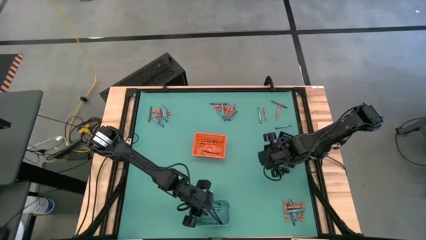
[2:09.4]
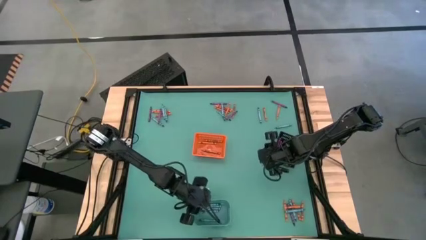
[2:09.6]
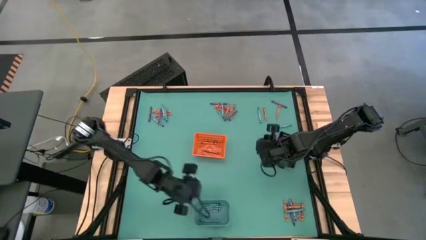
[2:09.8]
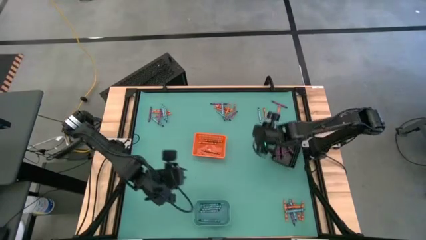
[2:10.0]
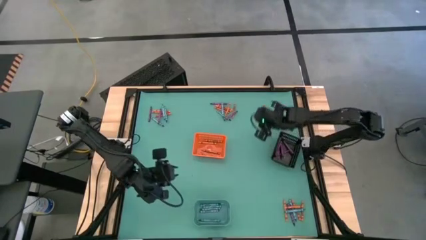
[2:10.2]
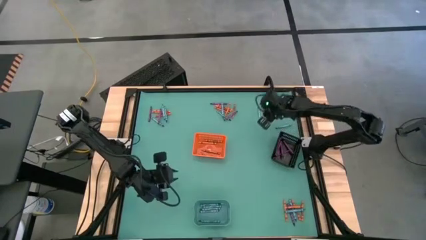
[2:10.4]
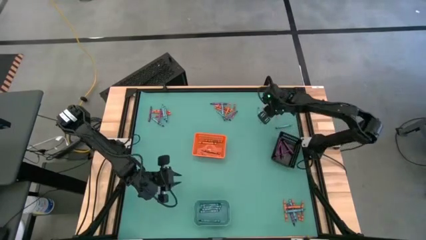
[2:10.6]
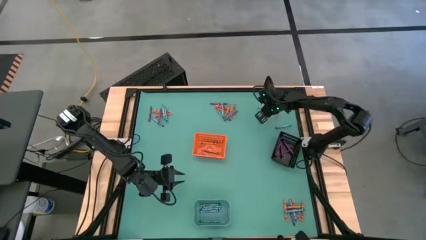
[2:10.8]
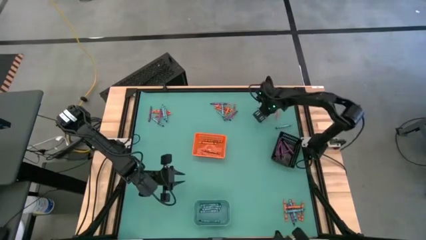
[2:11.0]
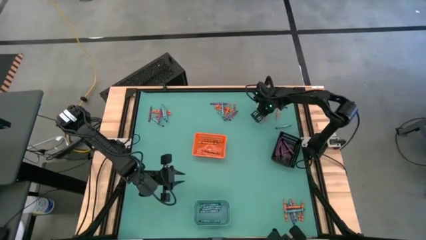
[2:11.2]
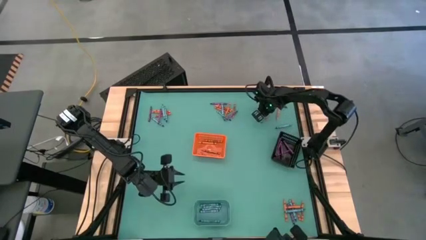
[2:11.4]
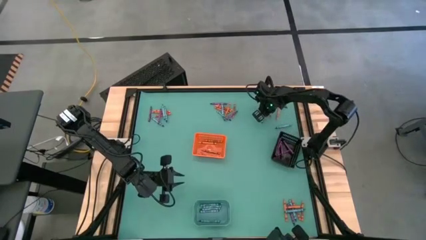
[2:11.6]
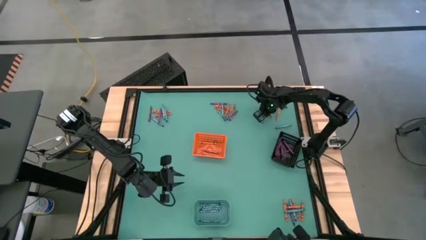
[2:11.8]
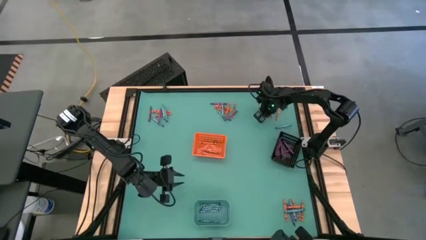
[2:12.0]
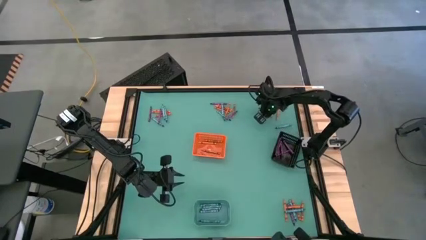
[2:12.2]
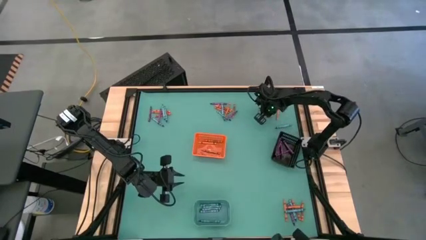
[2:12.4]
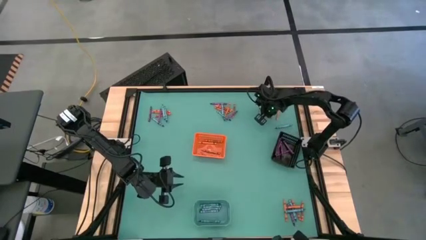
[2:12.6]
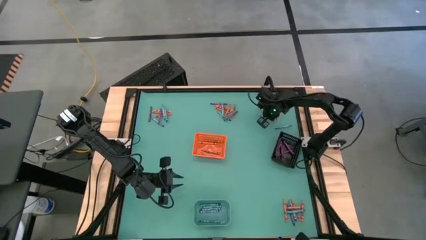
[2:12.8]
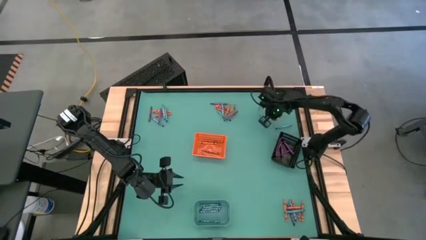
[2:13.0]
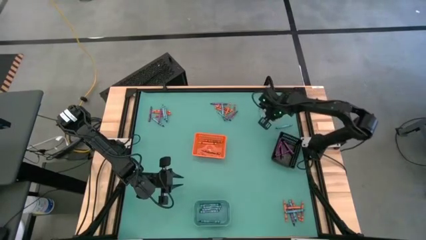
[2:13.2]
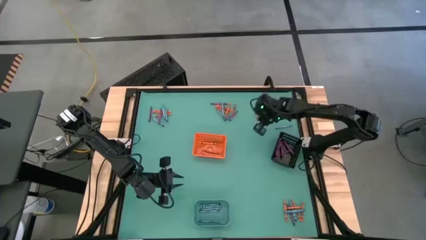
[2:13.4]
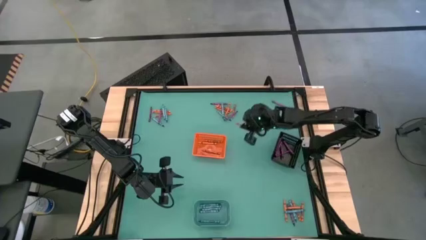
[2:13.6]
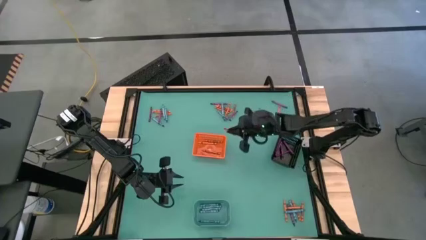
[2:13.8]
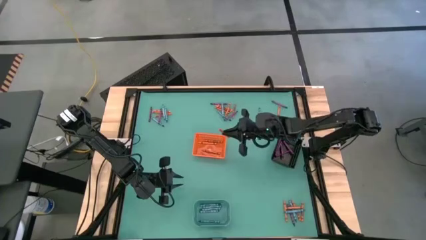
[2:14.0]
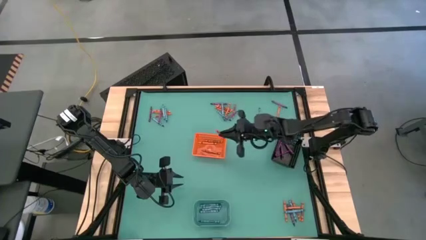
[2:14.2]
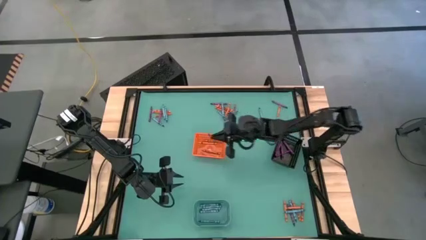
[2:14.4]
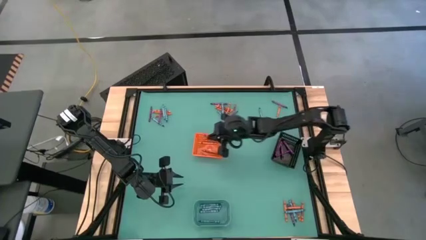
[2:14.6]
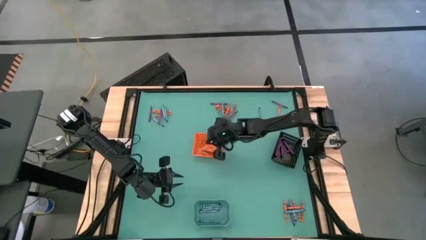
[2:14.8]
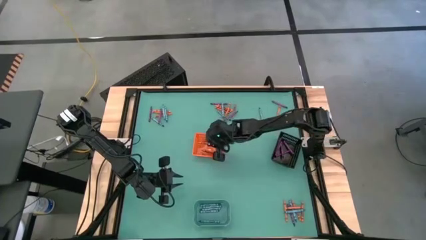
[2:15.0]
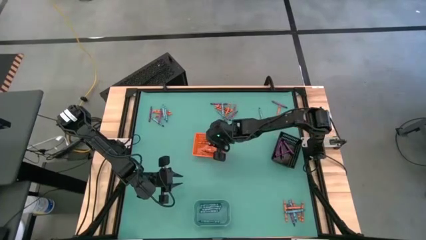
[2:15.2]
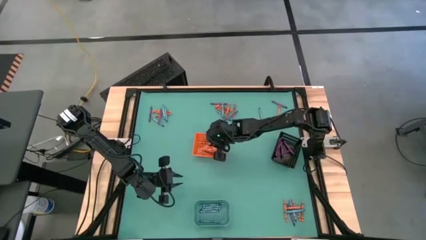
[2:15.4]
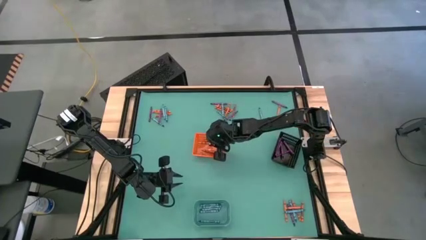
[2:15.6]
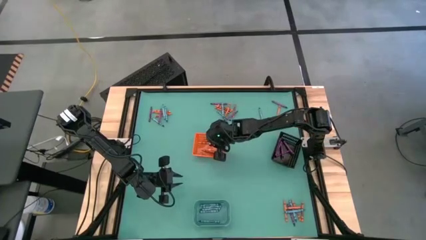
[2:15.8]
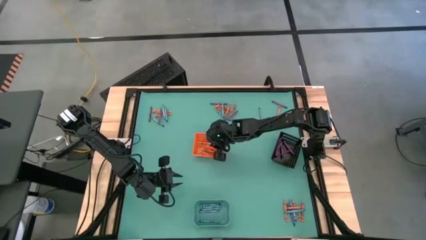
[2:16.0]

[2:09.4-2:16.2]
Task: Sort crayons
Put the orange crayon into the orange bin

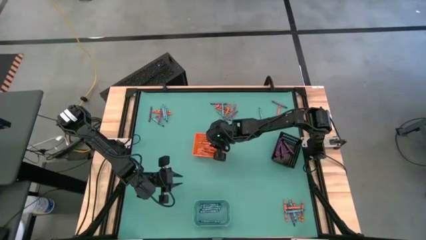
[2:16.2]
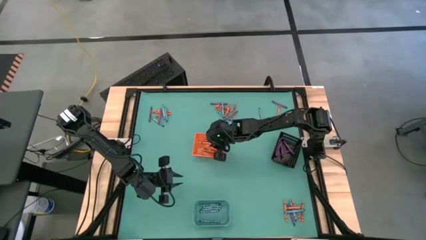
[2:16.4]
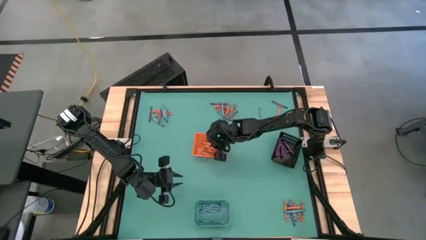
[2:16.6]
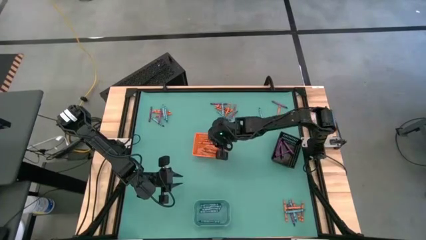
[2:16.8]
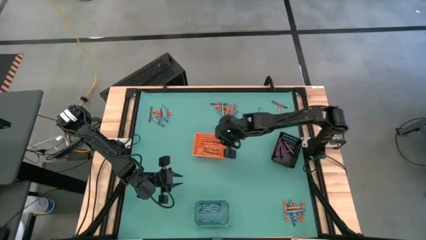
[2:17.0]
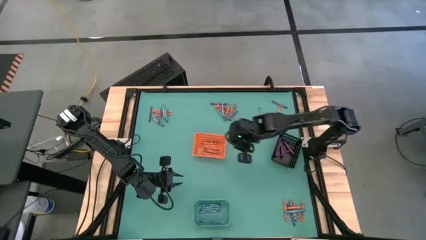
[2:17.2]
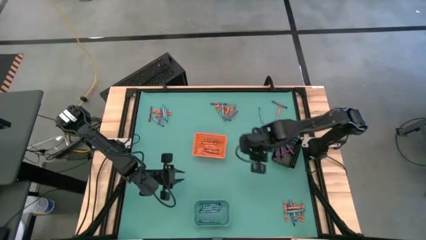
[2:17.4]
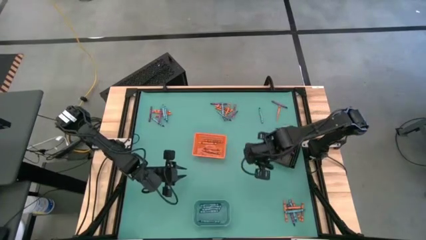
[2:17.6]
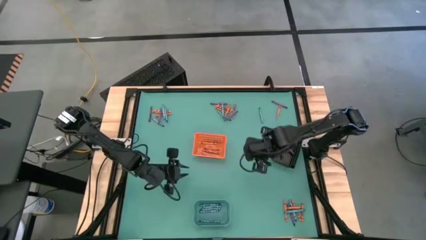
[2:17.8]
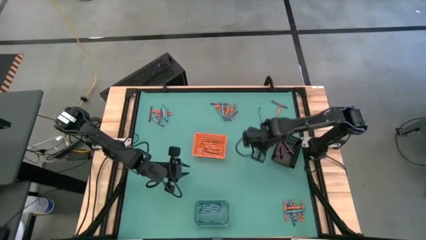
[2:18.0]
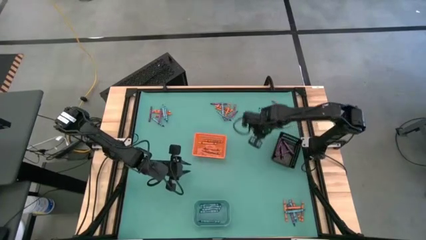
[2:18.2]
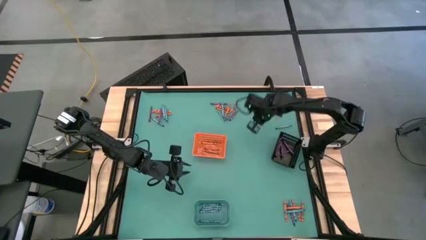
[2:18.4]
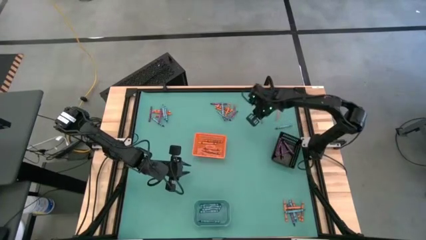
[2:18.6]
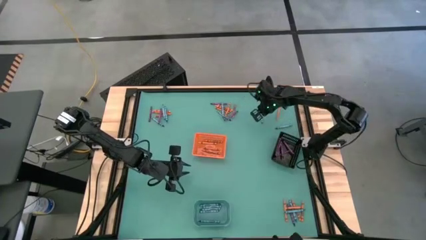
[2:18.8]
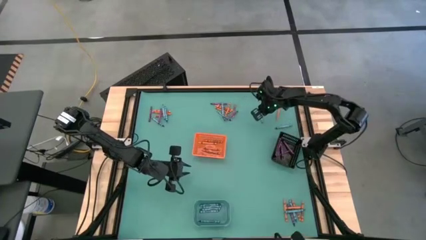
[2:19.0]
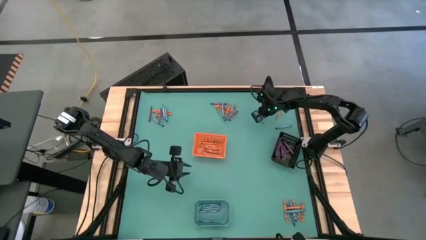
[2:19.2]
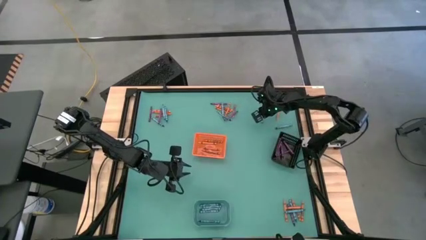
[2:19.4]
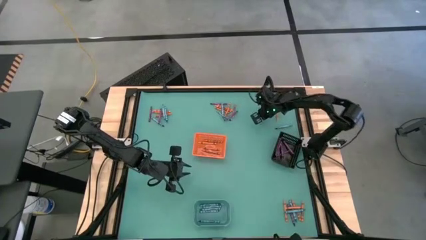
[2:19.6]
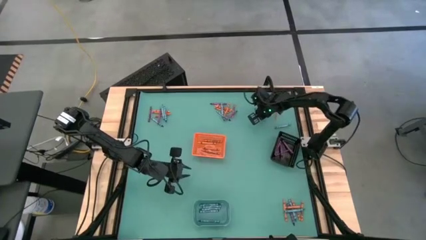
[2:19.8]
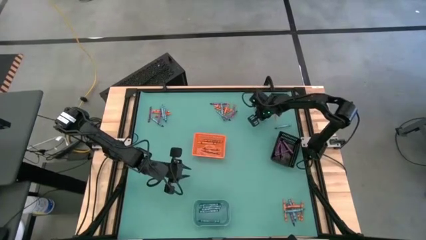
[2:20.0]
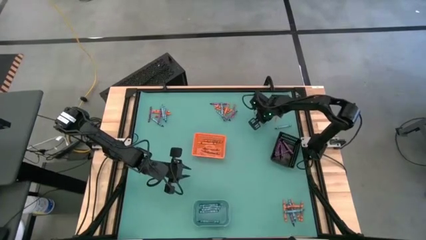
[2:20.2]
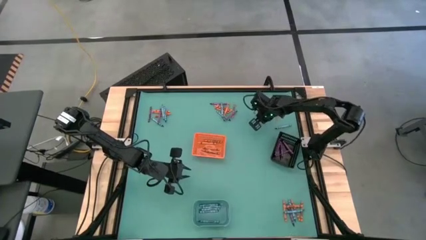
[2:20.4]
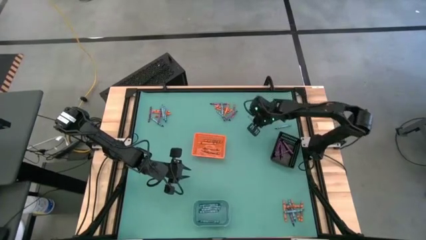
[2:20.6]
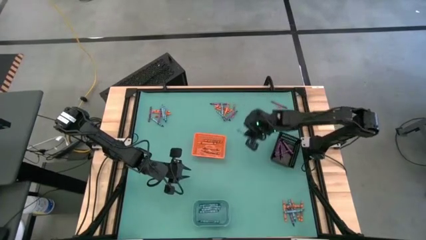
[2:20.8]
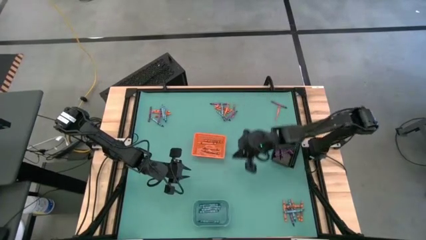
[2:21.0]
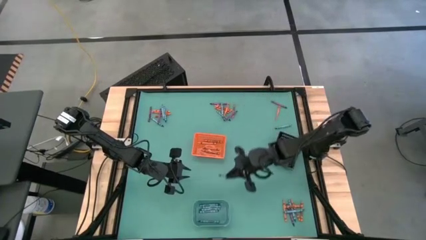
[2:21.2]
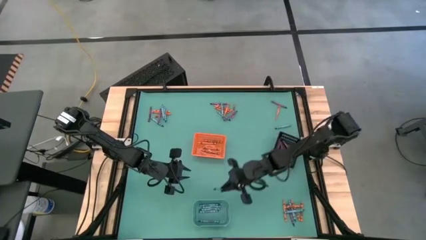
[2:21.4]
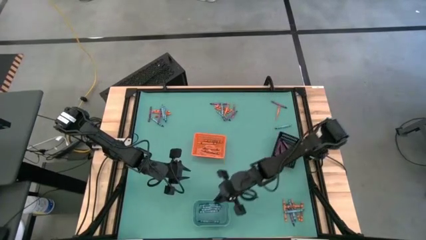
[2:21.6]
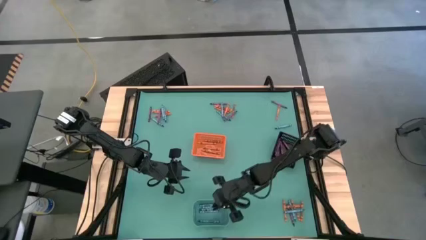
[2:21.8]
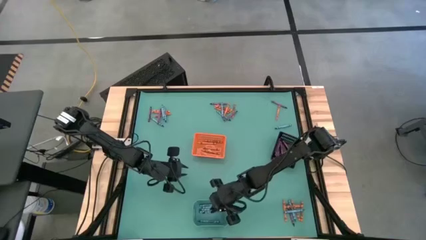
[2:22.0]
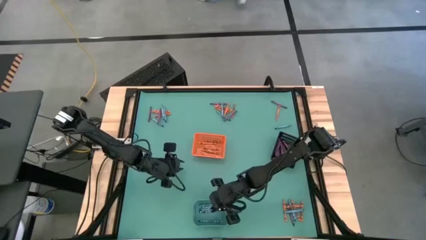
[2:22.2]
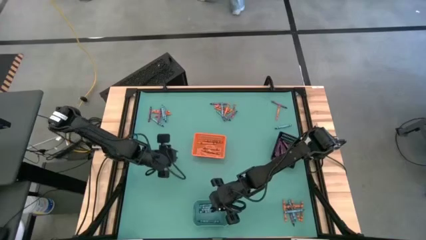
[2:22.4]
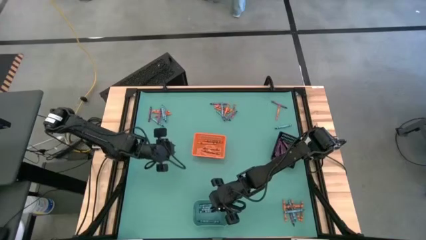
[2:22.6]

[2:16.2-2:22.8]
Put the blue crayon into the blue bin
